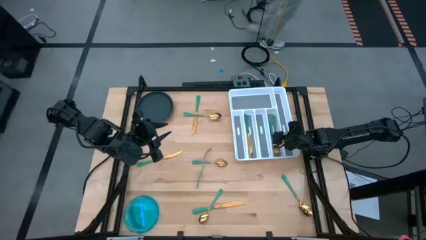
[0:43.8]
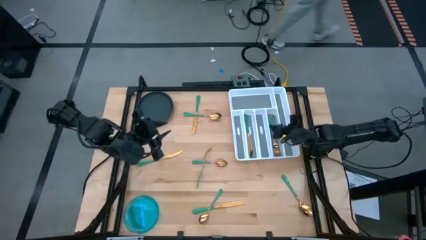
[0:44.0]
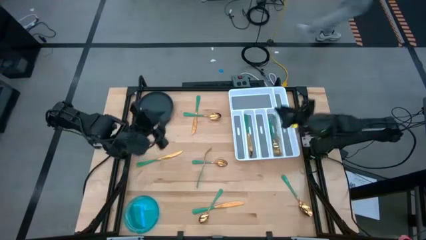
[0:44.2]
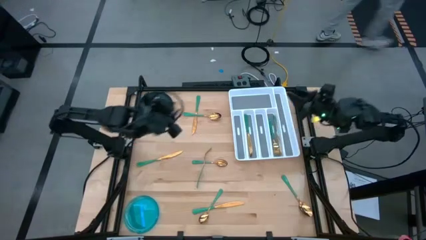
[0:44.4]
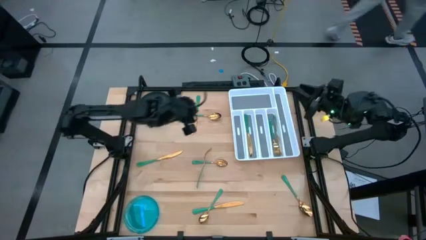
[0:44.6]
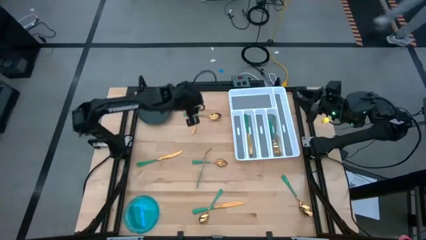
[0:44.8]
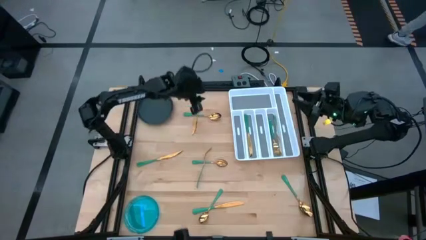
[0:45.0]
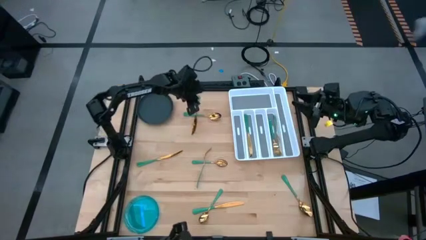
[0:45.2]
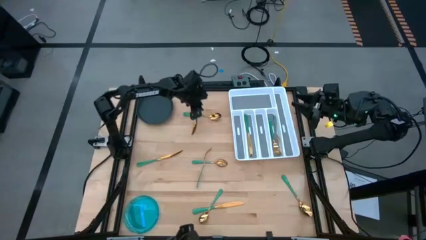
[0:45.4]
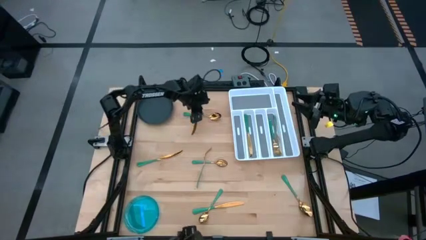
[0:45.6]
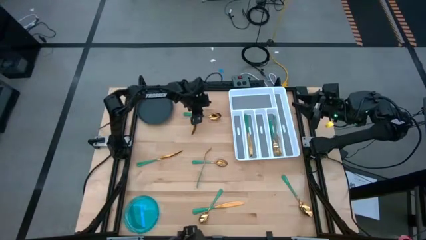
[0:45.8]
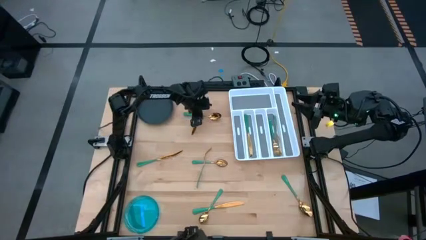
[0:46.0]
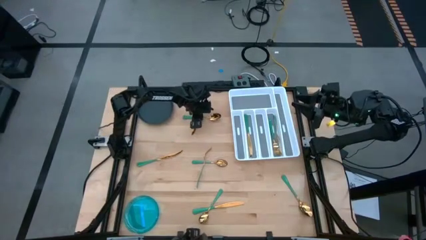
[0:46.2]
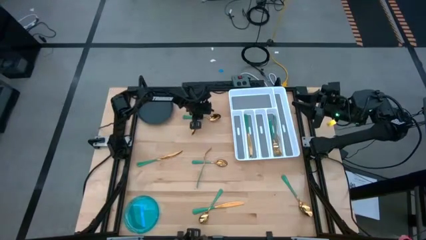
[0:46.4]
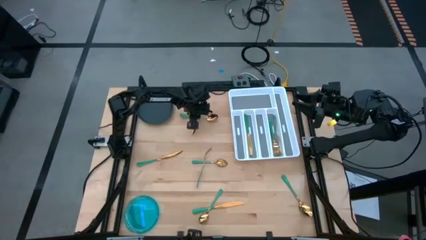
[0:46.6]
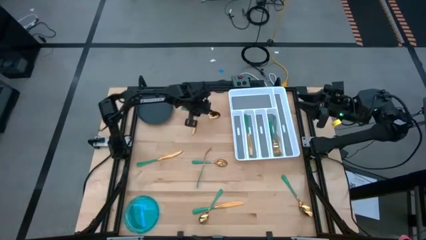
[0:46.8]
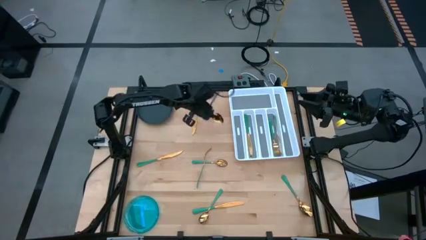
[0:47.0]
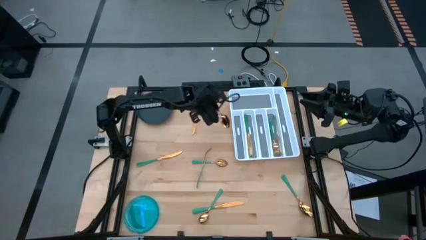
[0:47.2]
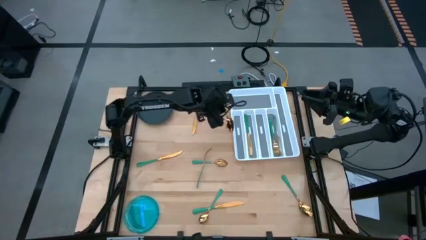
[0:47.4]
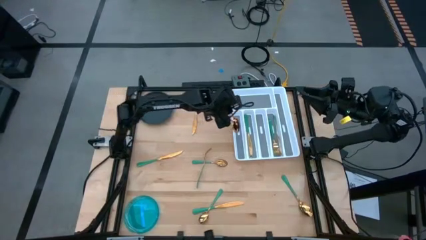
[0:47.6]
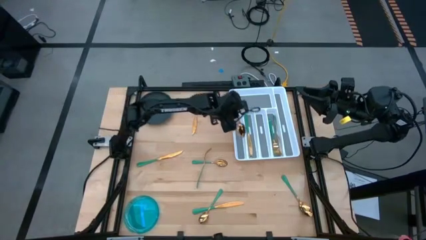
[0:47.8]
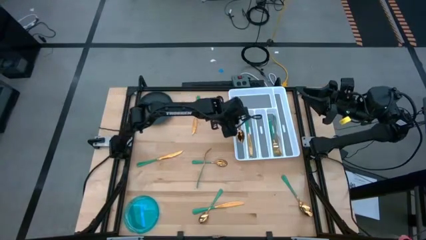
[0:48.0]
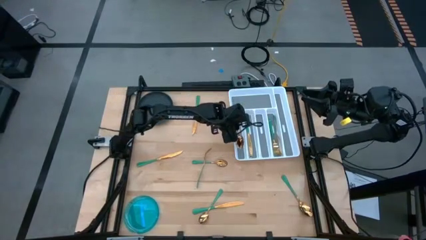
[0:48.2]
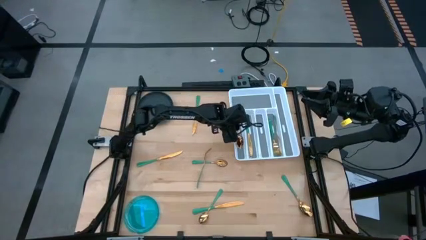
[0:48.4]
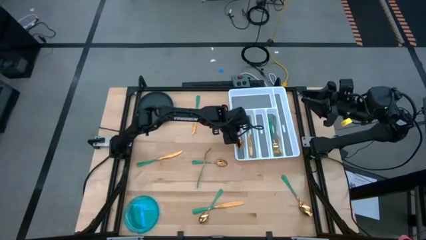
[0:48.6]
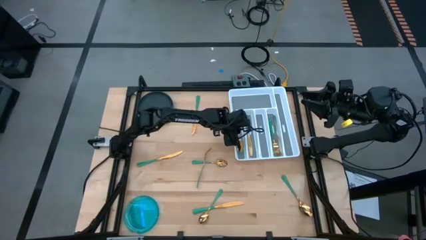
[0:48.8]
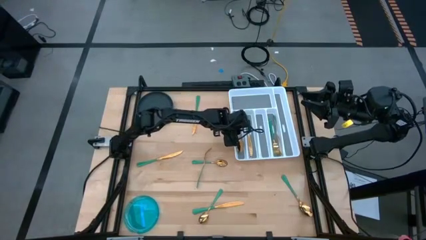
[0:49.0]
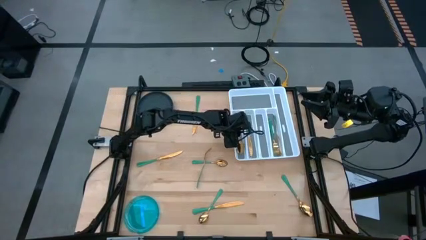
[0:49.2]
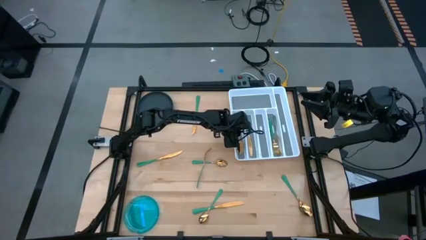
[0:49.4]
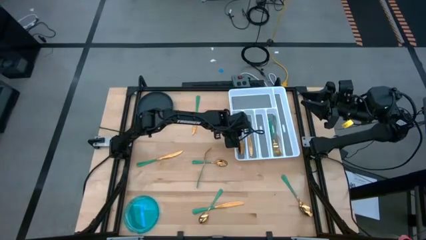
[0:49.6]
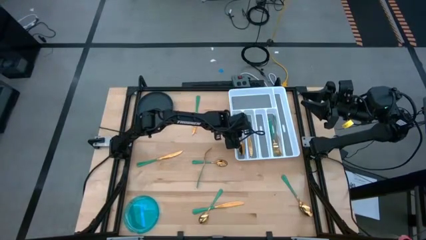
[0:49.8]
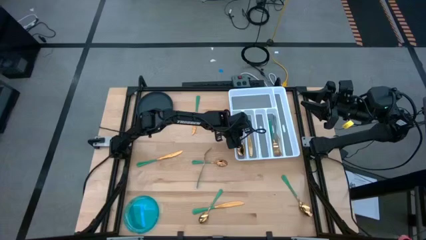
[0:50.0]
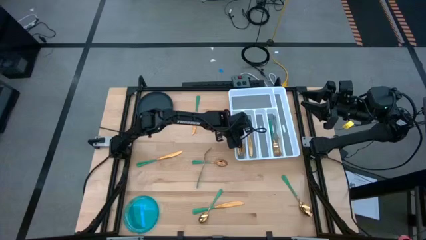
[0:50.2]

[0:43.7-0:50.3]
Task: Sort silverware
Put the top green spoon on the silverware tray

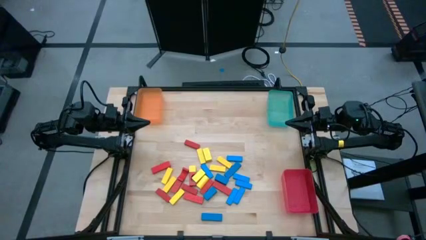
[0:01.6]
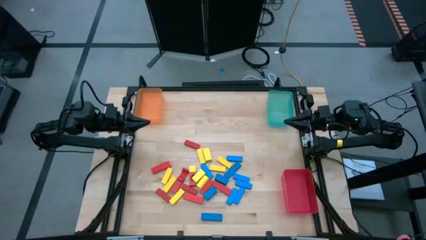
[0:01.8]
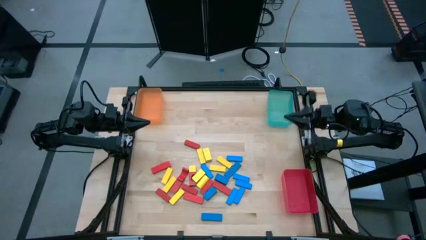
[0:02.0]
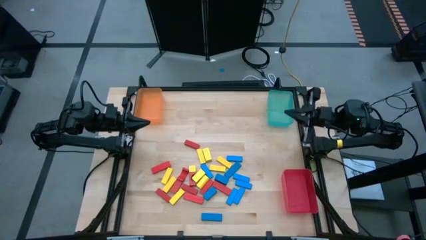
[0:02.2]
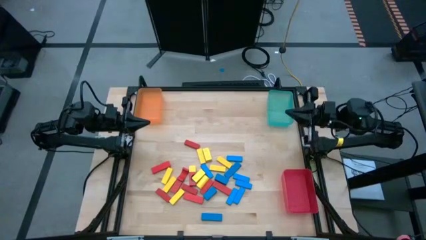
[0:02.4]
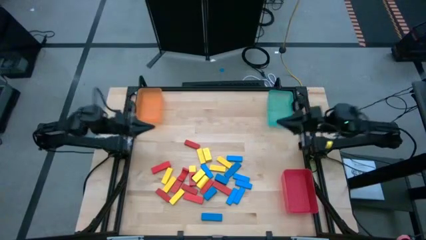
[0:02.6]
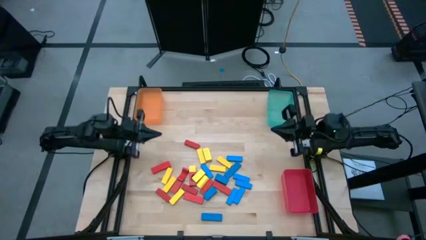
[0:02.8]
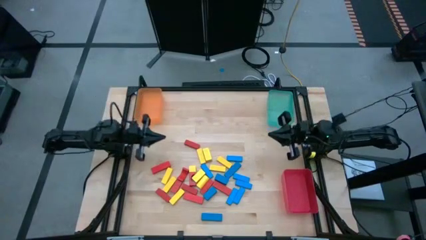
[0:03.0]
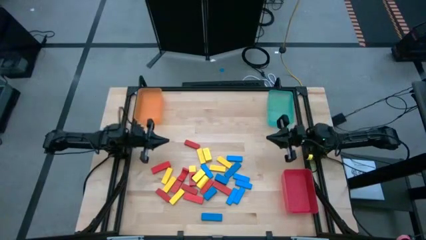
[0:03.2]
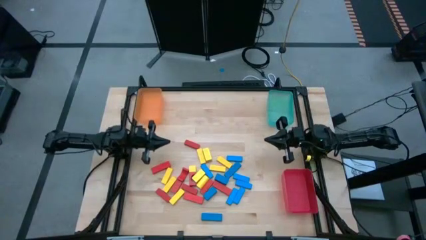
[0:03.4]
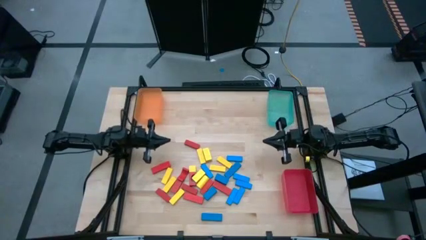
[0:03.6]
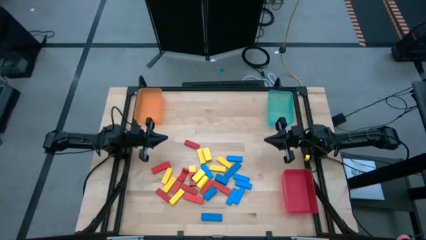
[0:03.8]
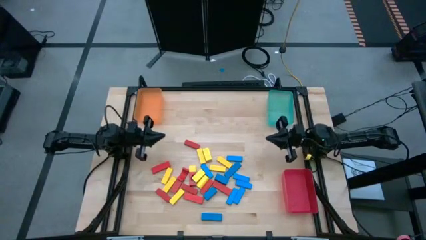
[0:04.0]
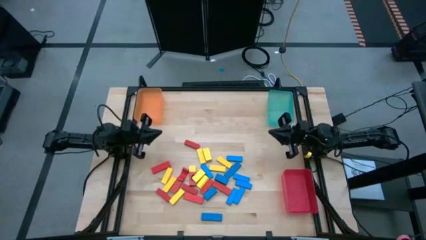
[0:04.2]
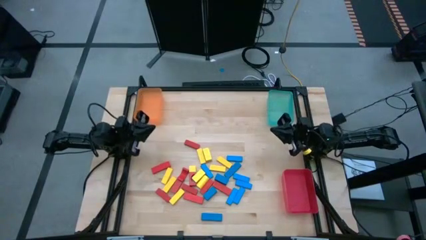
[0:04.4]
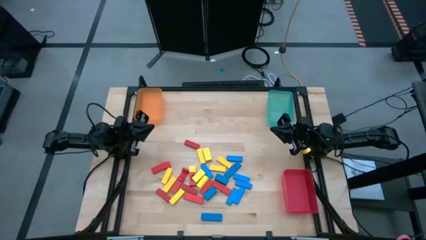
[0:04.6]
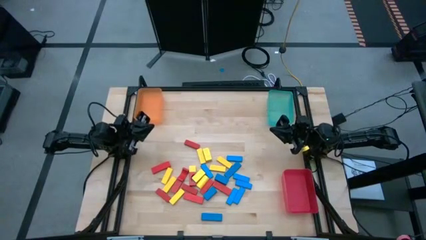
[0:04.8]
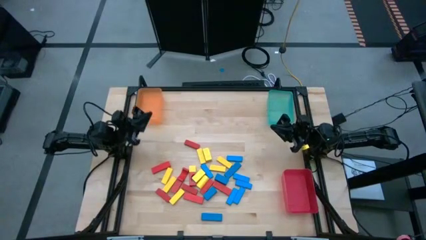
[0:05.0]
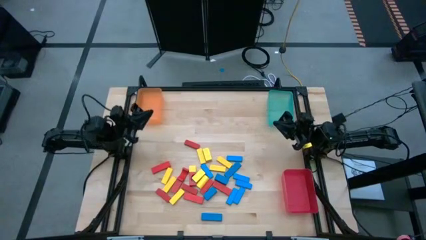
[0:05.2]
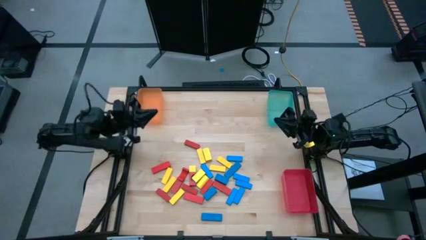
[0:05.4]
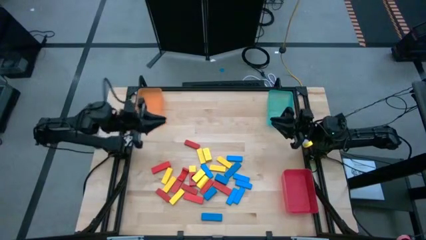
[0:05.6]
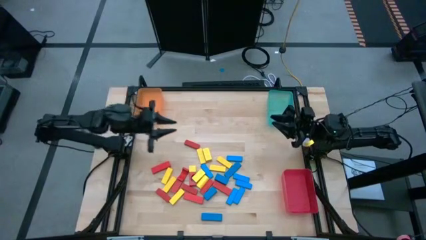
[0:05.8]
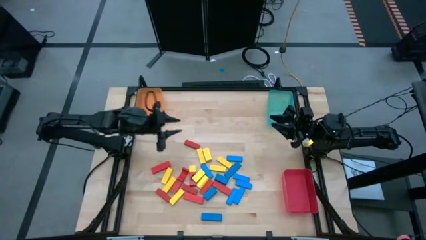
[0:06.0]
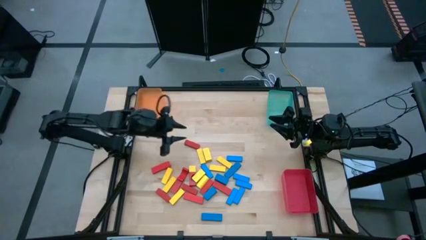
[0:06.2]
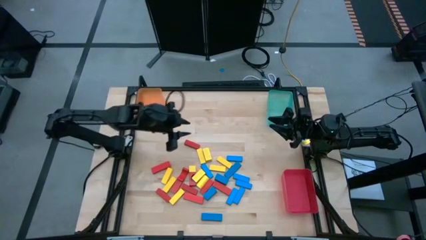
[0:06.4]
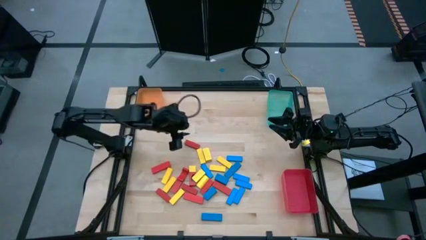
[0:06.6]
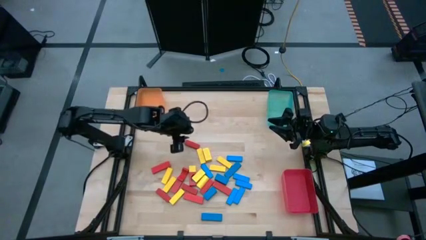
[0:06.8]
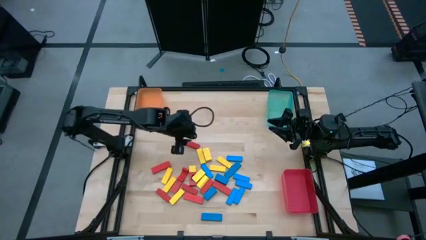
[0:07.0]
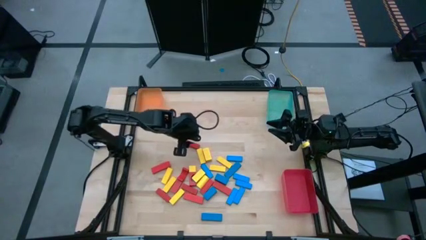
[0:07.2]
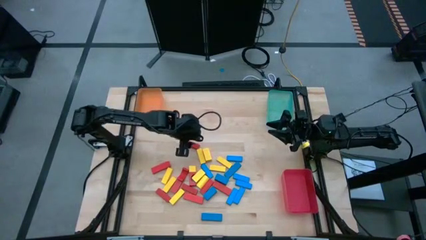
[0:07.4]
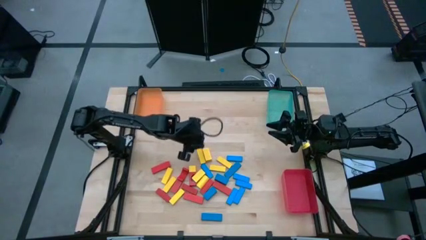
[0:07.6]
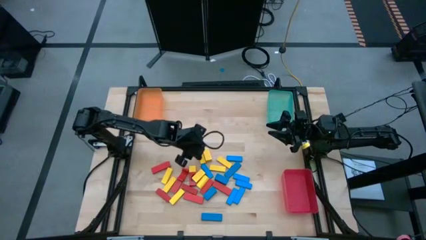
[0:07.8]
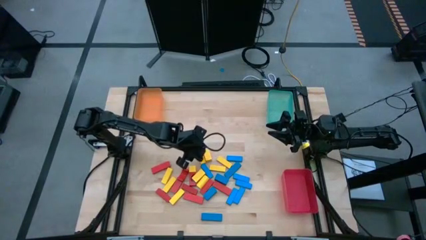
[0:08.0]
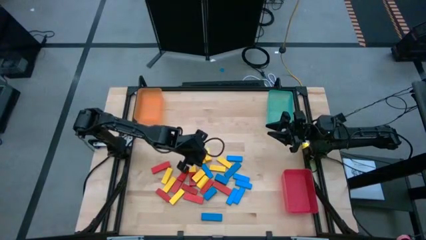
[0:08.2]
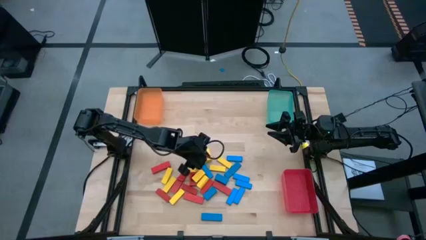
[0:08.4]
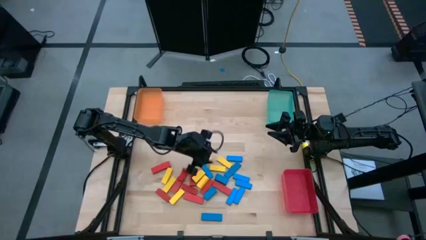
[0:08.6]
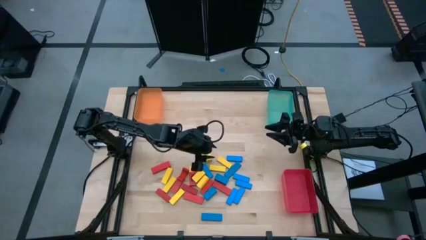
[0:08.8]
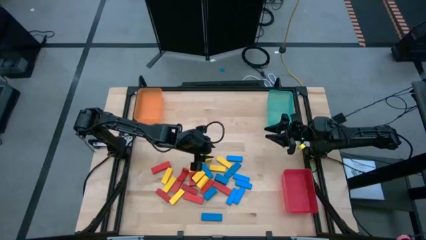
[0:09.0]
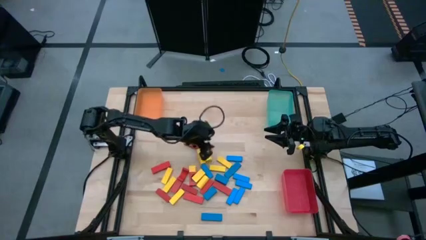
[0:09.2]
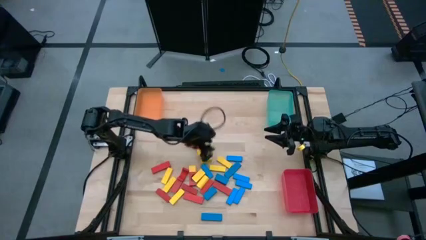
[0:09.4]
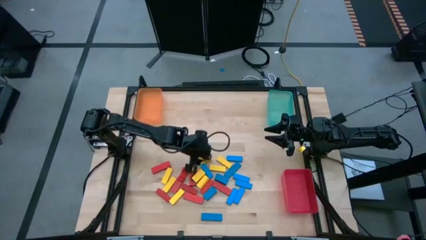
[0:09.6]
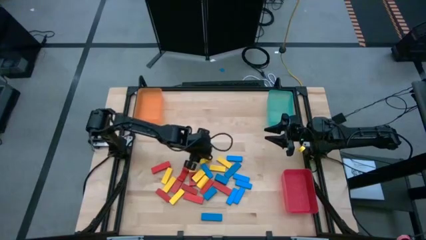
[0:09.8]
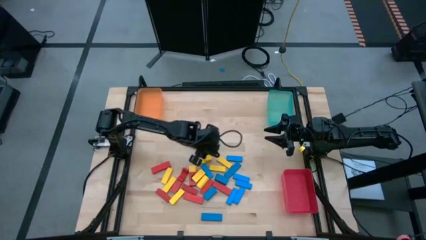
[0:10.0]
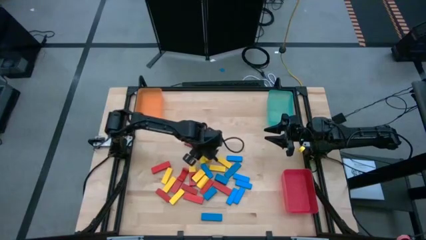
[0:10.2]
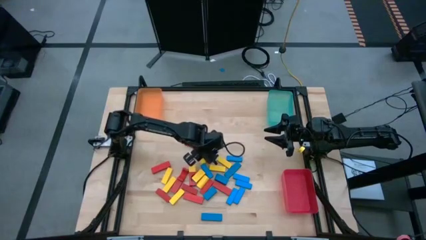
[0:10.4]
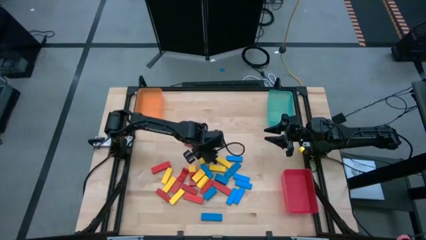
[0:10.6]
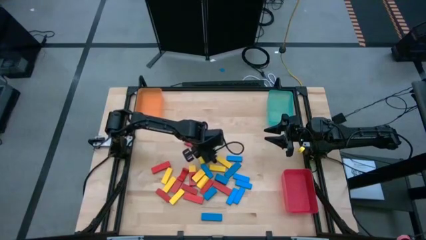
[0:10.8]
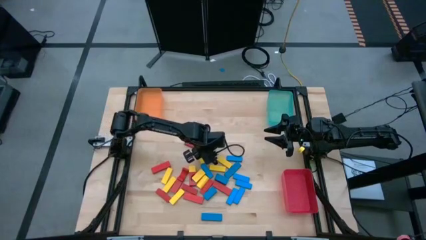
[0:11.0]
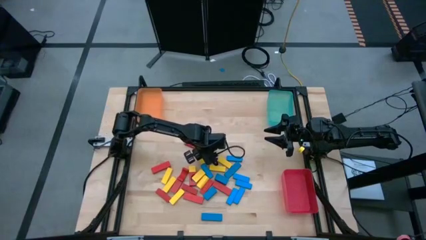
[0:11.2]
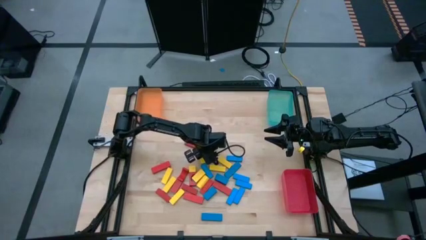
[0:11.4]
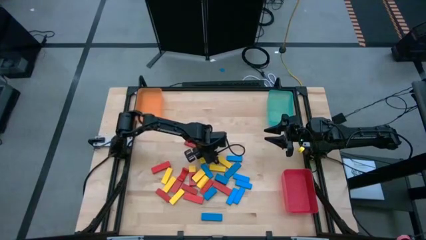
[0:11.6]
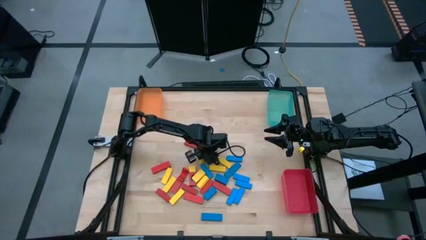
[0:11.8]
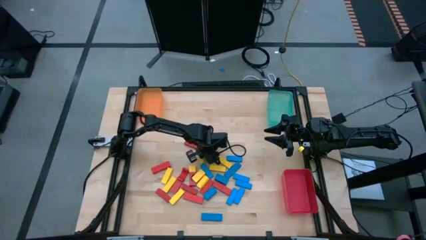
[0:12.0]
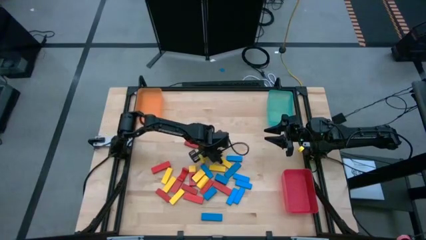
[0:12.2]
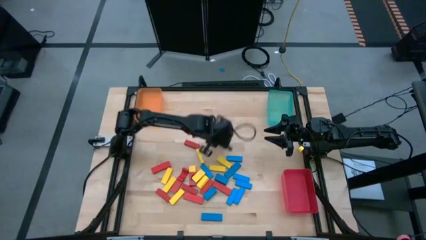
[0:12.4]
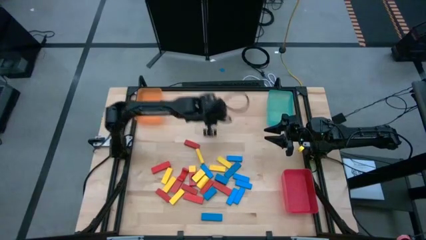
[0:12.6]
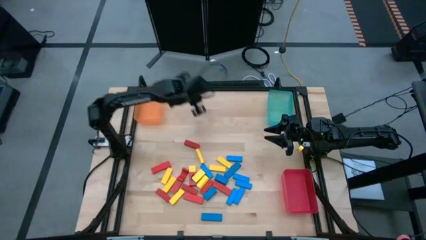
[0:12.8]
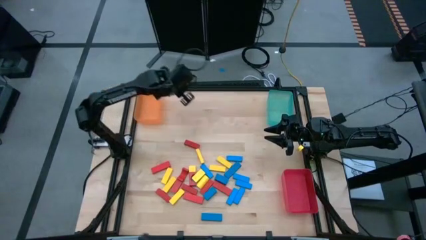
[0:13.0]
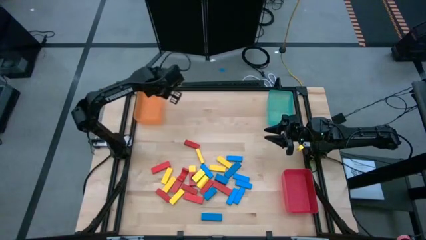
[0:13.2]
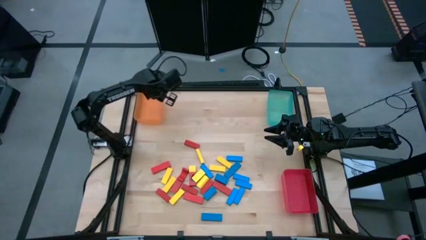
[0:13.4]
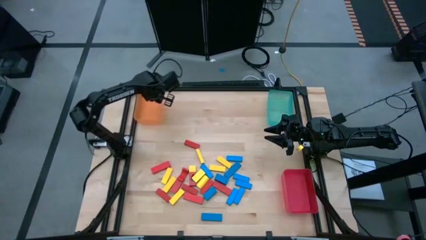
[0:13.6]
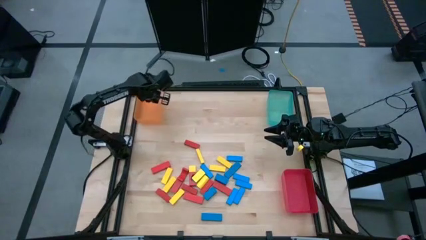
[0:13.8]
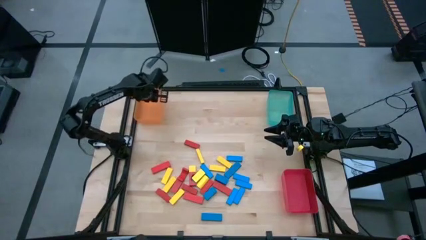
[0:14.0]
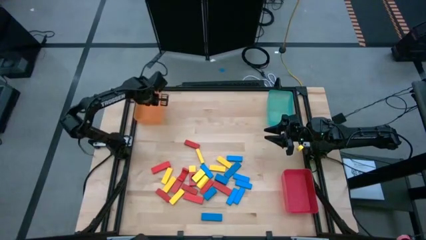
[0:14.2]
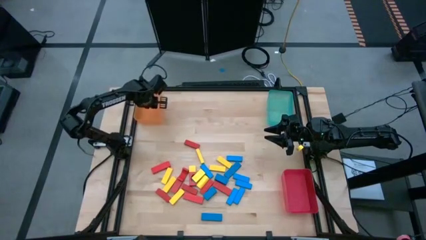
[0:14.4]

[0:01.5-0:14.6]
Task: Sort blocks
Put the yellow block into the orange bin
